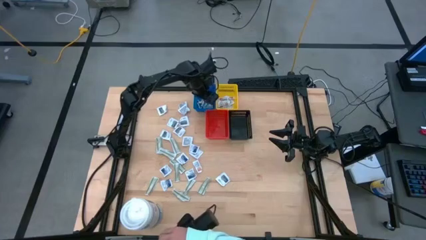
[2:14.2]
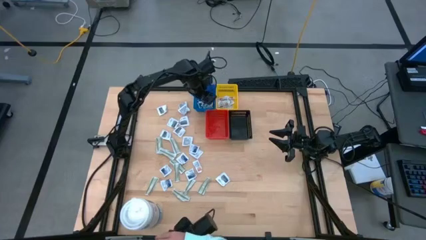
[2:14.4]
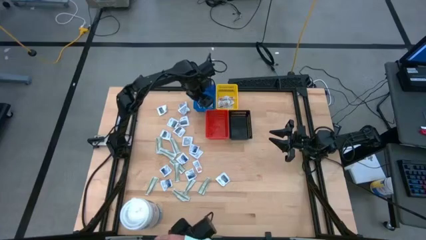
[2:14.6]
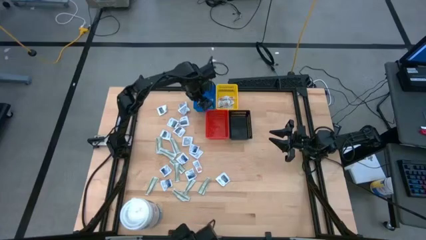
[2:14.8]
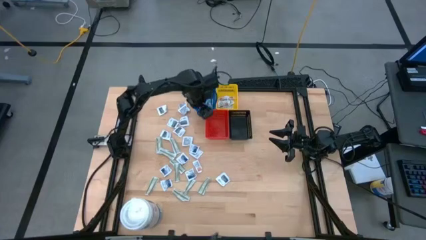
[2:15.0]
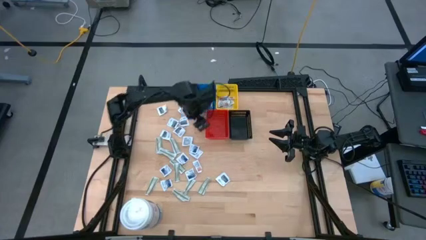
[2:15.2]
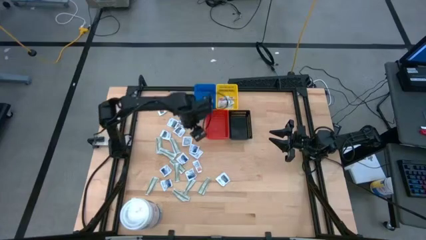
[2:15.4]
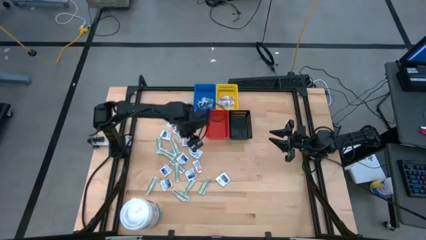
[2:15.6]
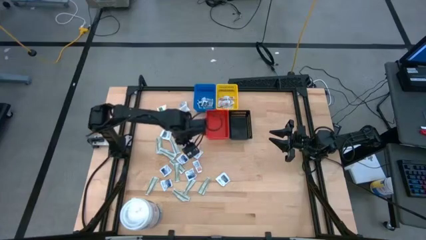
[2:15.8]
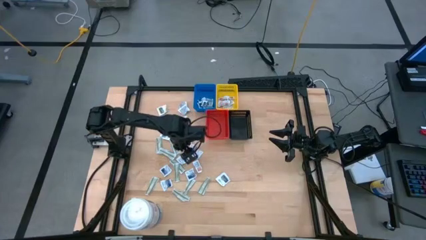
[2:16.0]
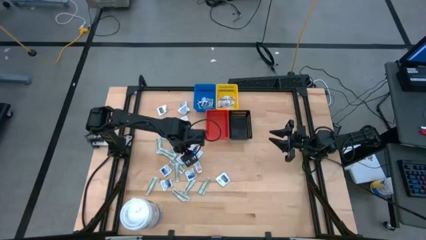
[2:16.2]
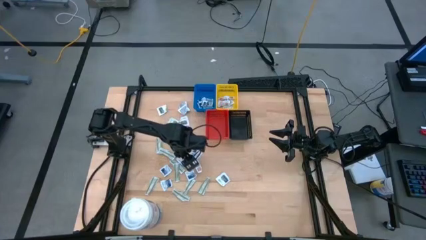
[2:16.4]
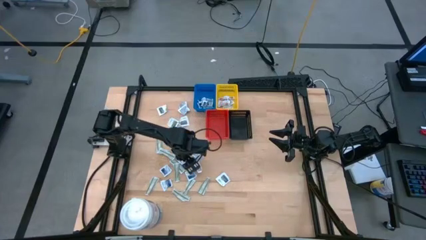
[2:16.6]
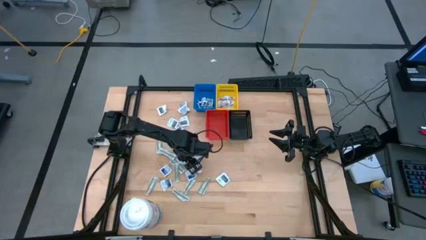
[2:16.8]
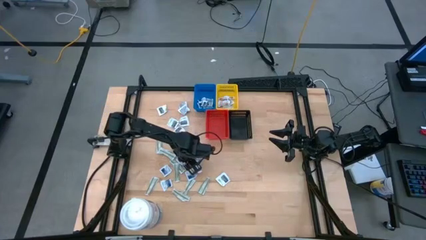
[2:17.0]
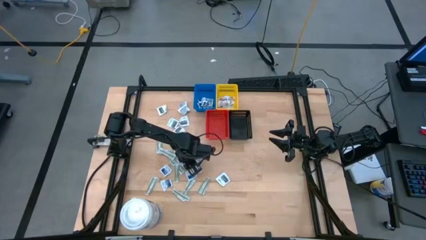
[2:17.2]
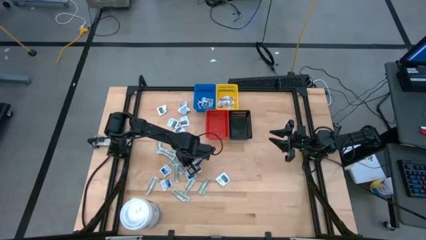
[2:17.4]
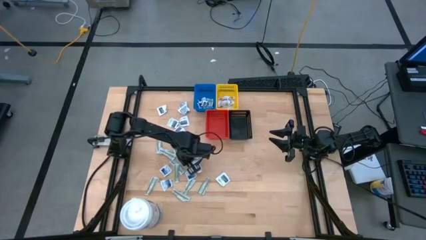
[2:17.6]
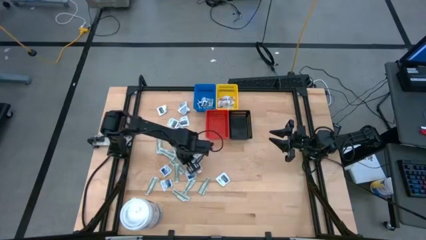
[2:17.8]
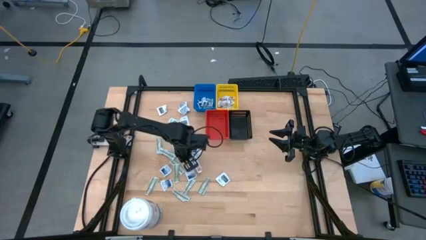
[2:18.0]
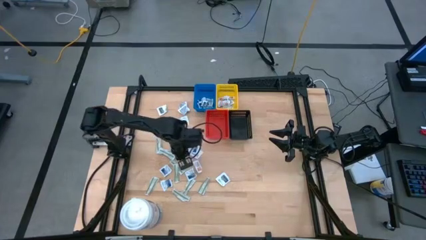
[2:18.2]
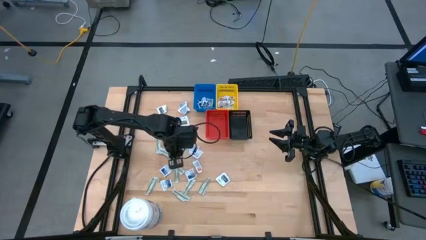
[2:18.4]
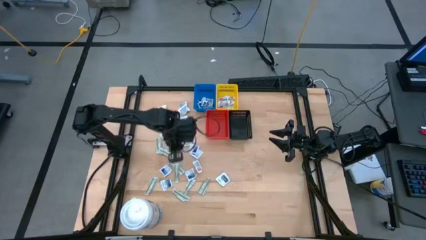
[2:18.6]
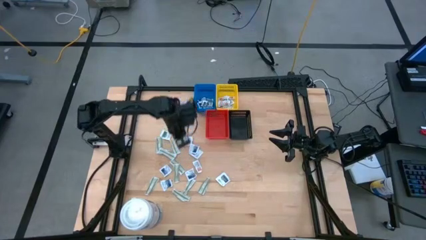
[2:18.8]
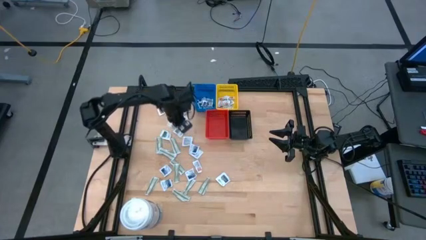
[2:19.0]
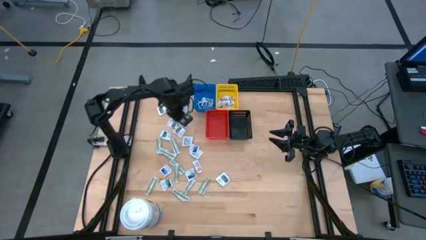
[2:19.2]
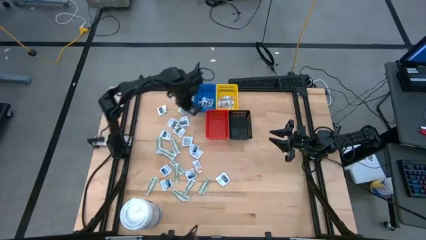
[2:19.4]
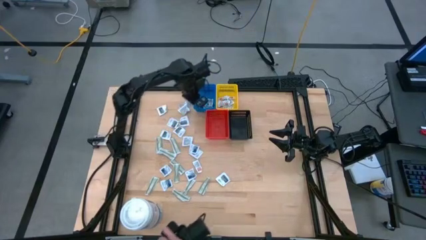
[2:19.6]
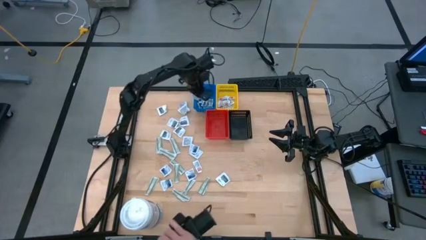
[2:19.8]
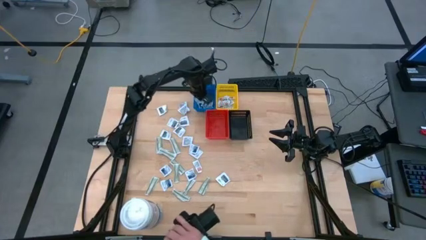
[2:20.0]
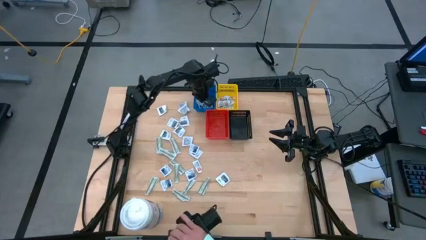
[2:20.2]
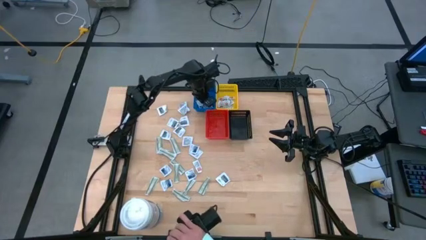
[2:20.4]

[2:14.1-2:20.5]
Task: Pick & Place First Aid Supplies
Put the alcohol pad into the blue bin

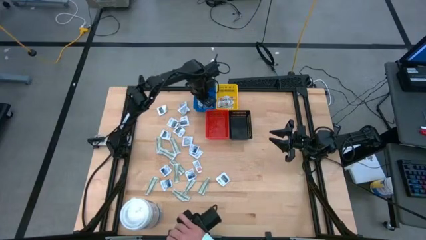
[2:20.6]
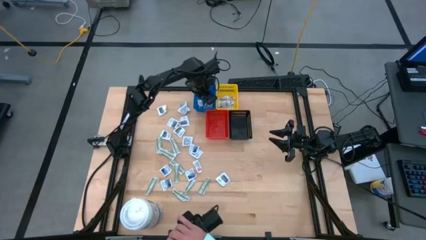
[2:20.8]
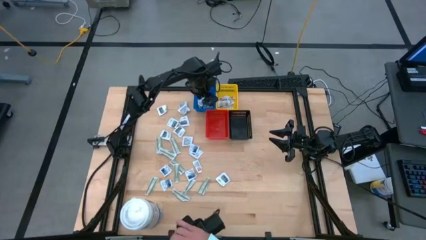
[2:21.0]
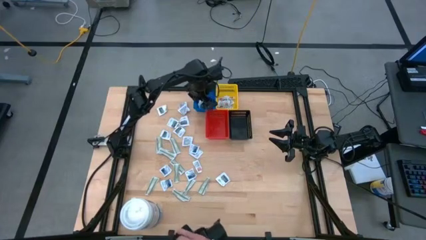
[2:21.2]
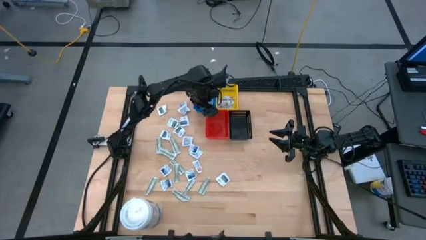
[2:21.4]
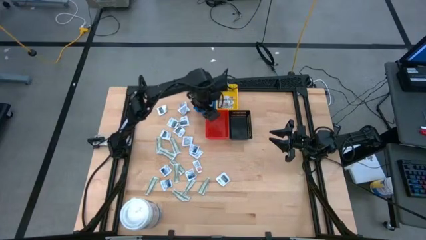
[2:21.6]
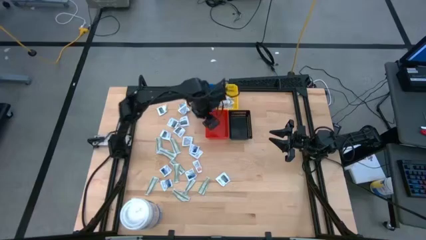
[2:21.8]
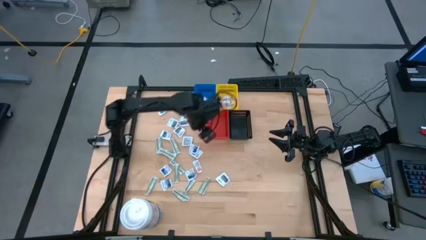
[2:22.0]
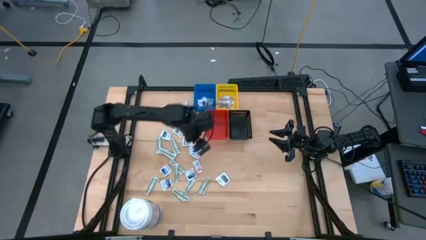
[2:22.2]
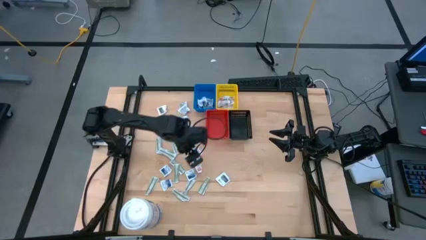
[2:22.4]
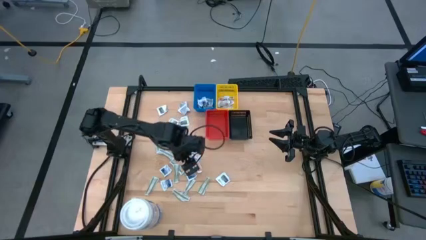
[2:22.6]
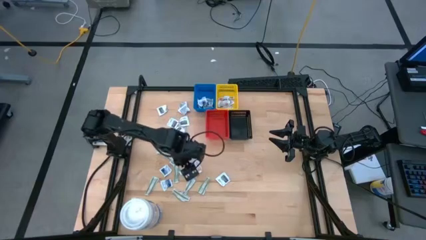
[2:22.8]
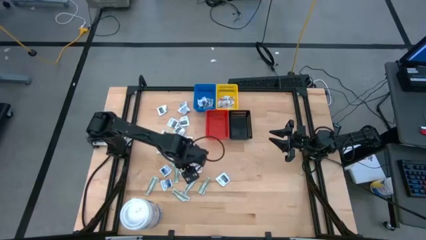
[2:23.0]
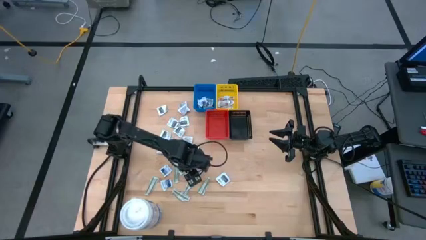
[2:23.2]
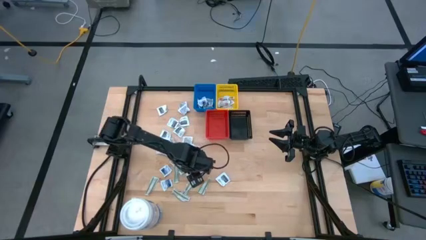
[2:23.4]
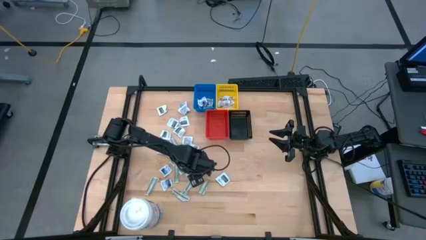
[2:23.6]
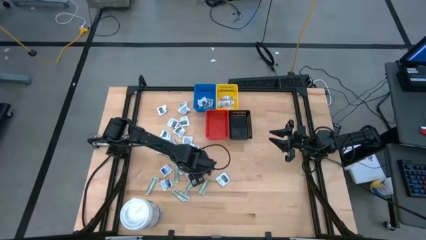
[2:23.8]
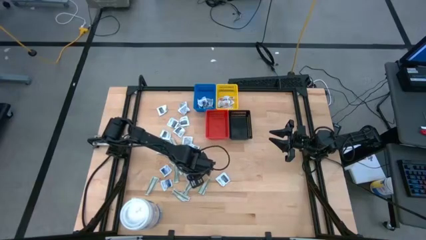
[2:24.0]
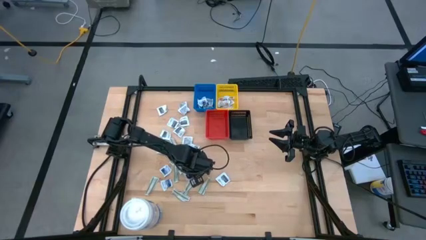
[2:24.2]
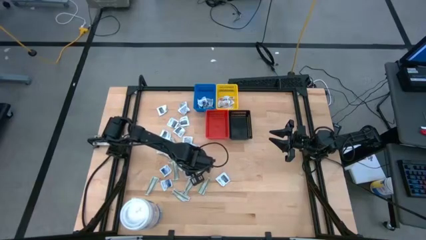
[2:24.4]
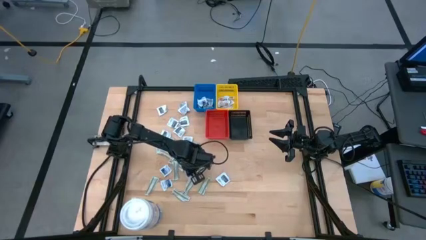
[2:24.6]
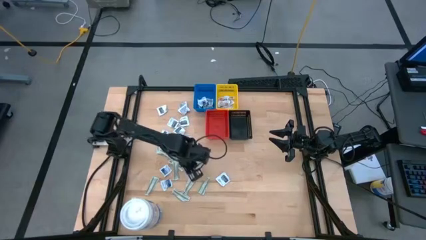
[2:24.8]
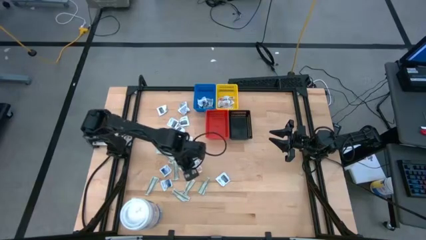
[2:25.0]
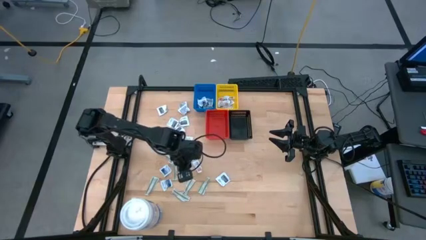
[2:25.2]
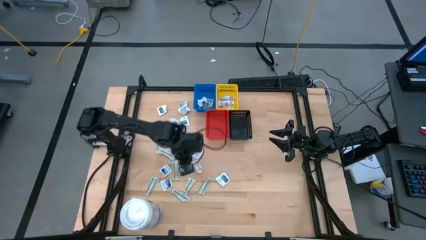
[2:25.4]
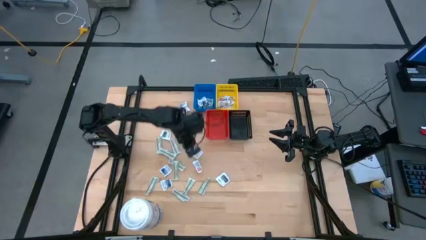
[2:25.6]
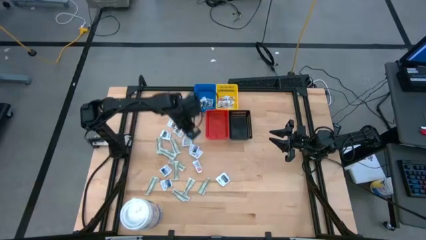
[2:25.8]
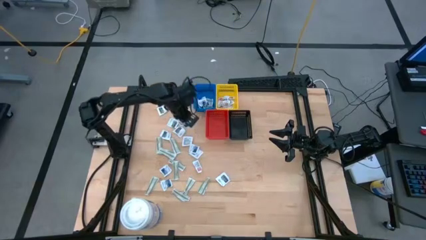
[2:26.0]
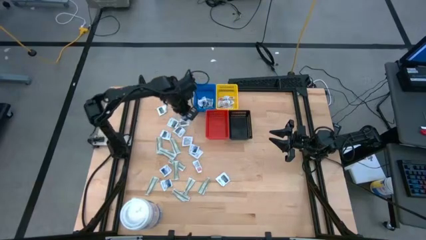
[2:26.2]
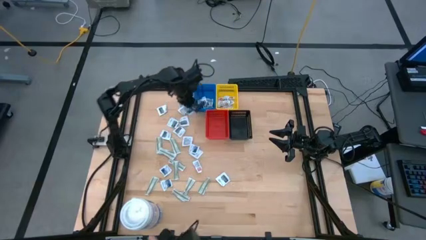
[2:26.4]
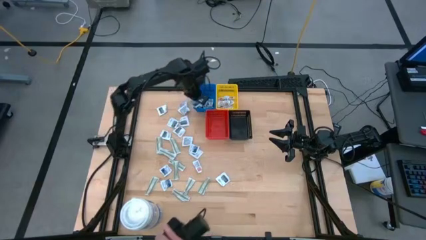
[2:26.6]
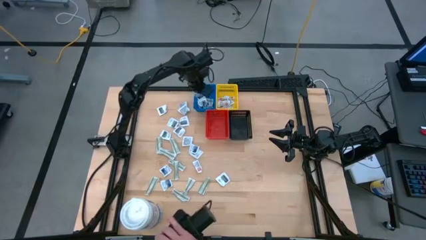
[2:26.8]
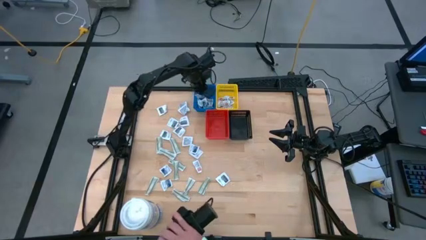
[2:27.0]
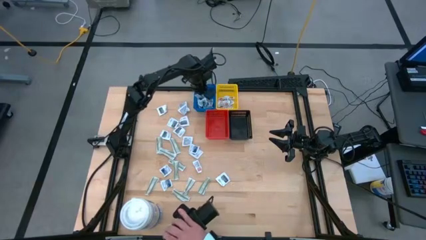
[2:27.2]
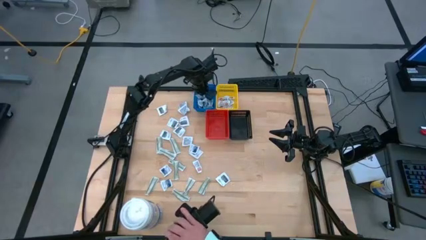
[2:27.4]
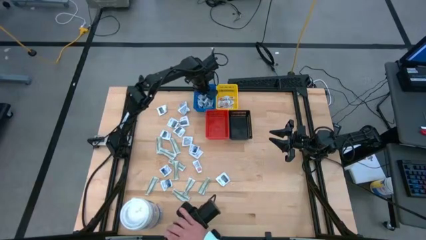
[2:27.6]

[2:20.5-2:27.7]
Put the alcohol pad into the blue bin
